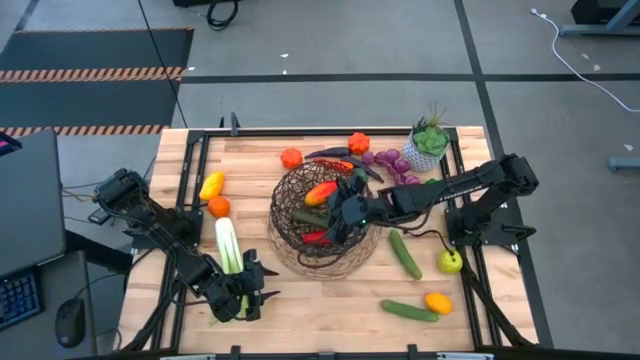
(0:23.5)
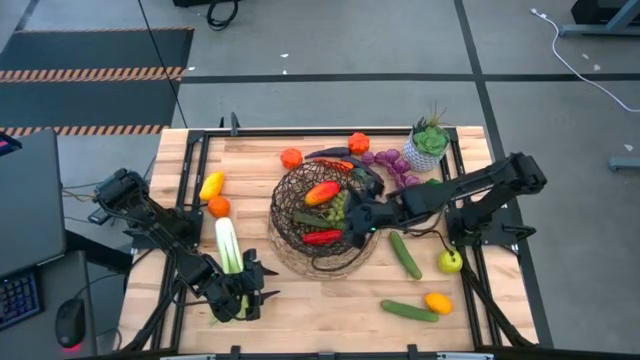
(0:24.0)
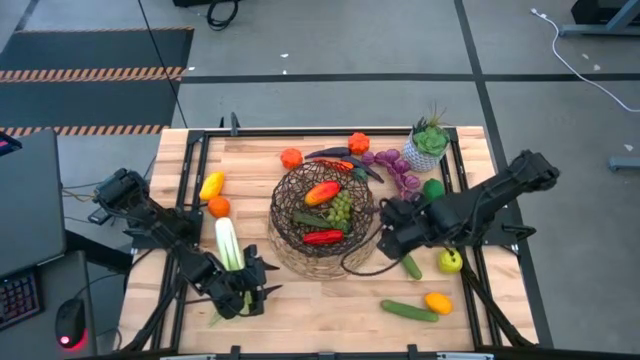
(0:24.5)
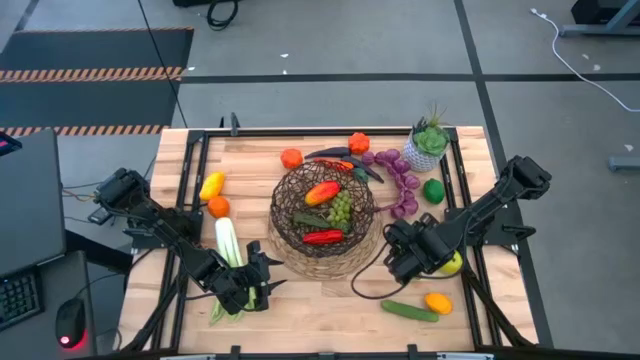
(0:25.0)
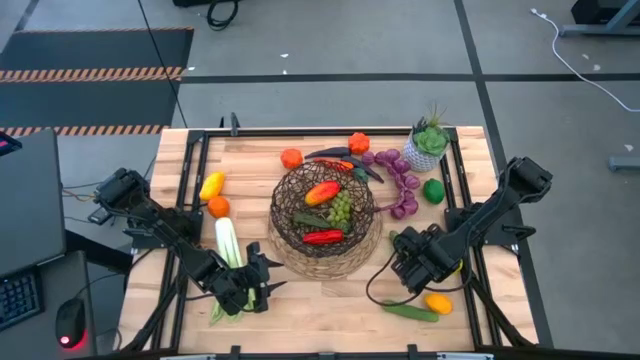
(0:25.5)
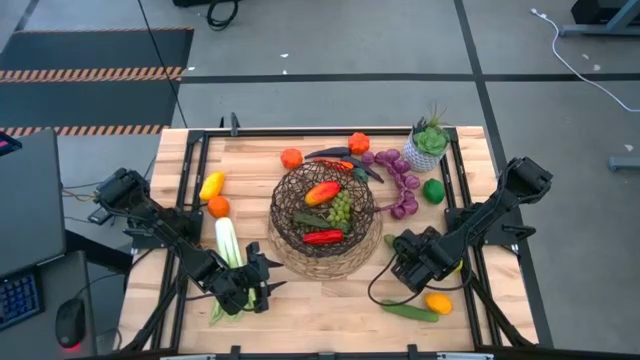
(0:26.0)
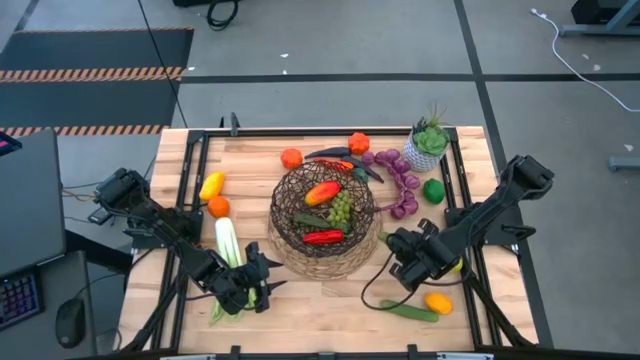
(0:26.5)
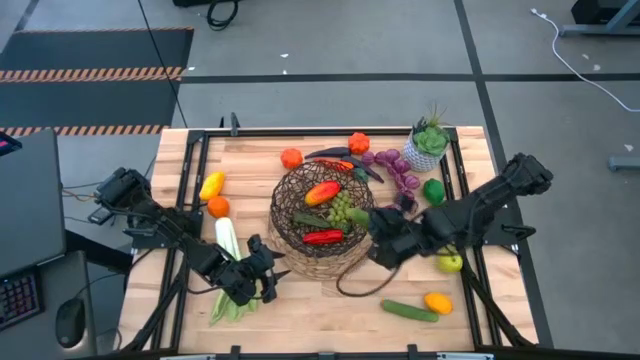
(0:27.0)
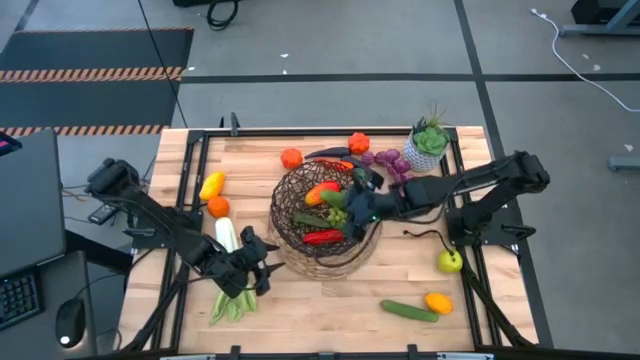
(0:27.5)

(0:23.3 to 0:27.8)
Task: Build produce basket
Put the top green cucumber into the black basket

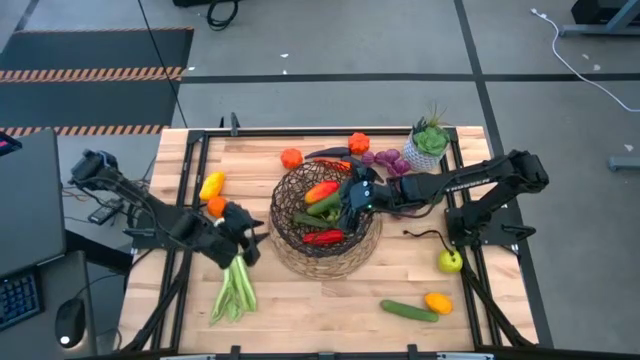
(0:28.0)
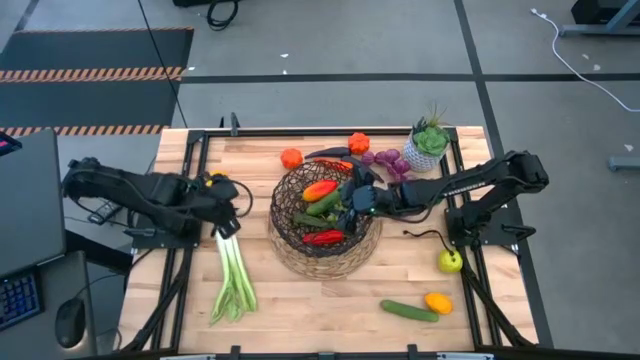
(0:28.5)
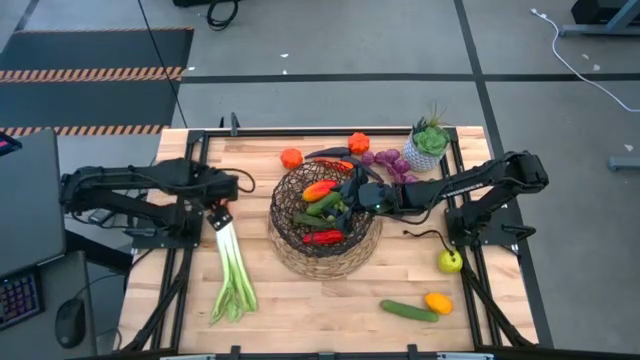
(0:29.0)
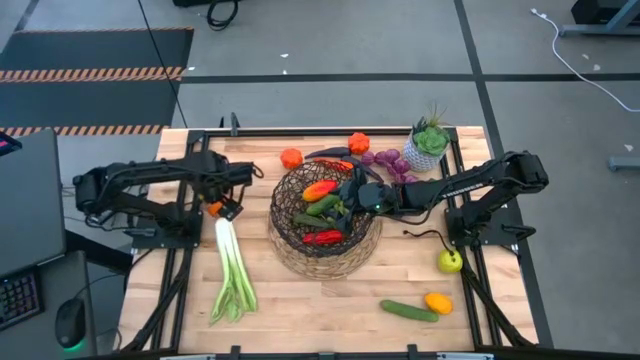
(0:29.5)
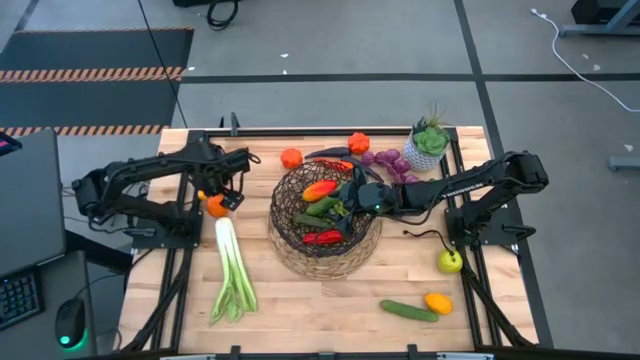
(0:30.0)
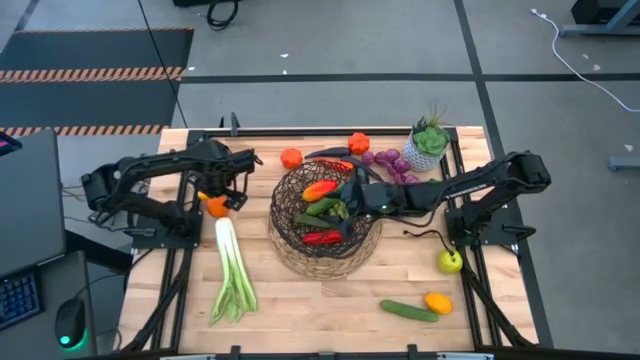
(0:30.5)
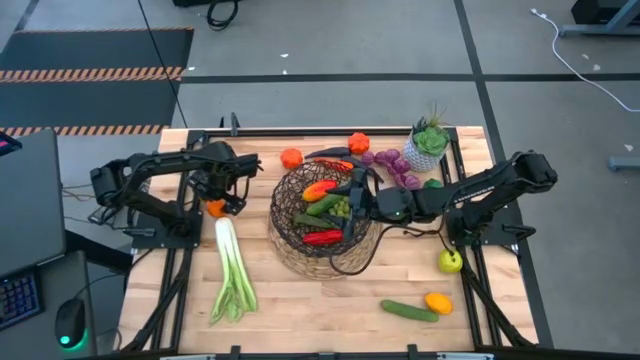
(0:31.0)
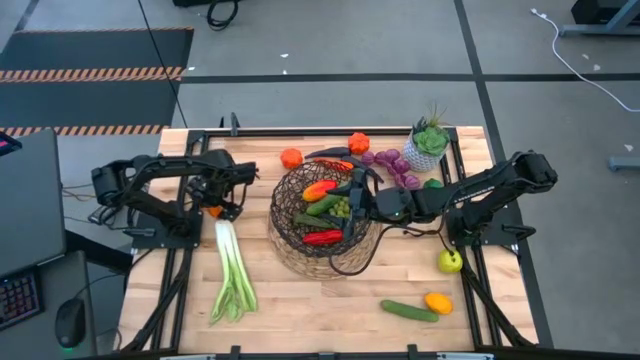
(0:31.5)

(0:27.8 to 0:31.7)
Put the orange into the black basket

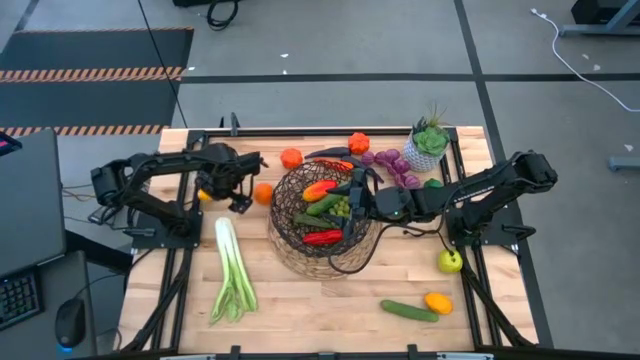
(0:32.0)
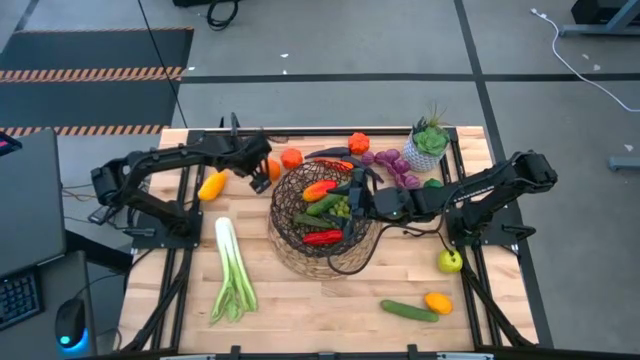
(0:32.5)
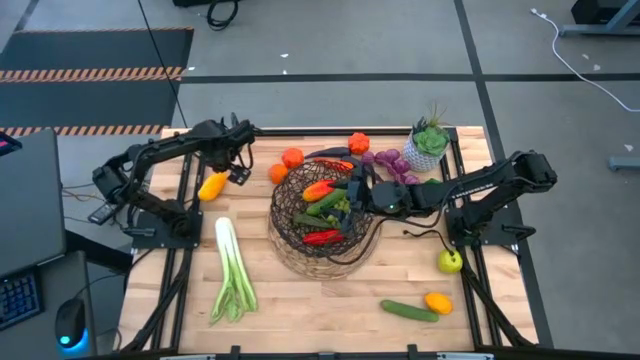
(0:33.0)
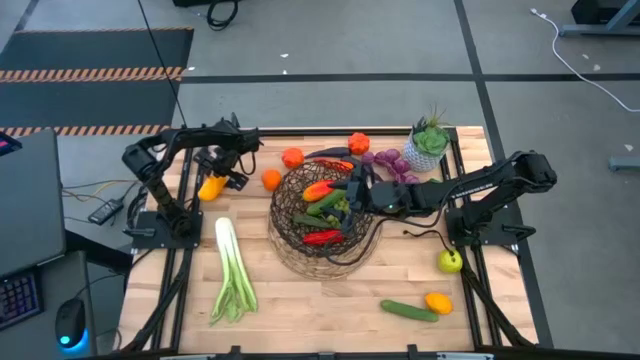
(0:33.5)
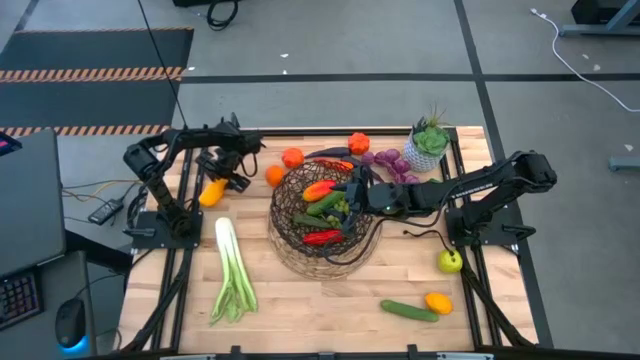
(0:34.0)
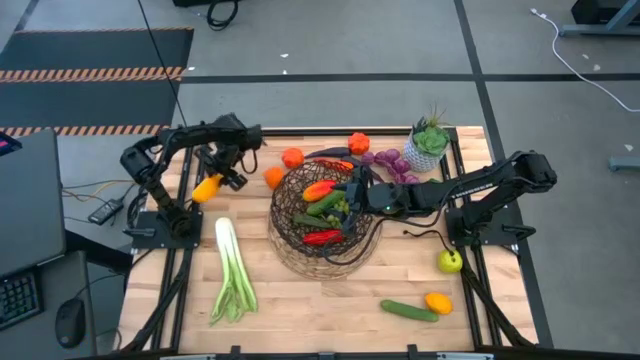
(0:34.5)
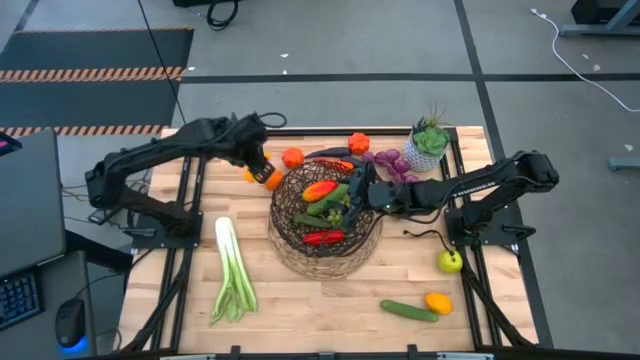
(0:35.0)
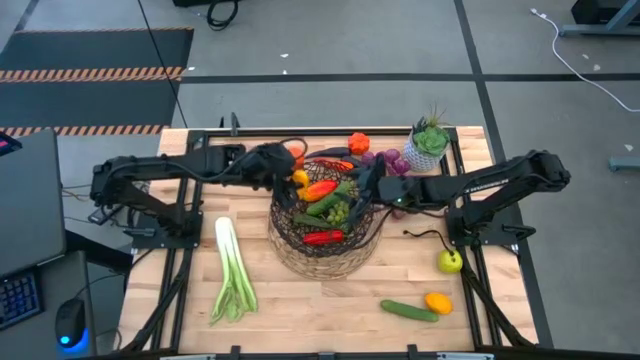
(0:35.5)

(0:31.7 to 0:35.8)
Put the yellow mango into the black basket

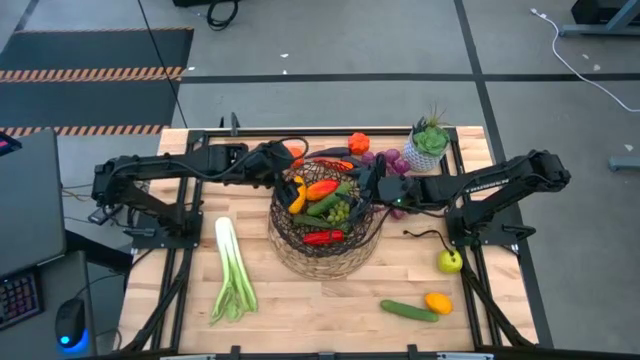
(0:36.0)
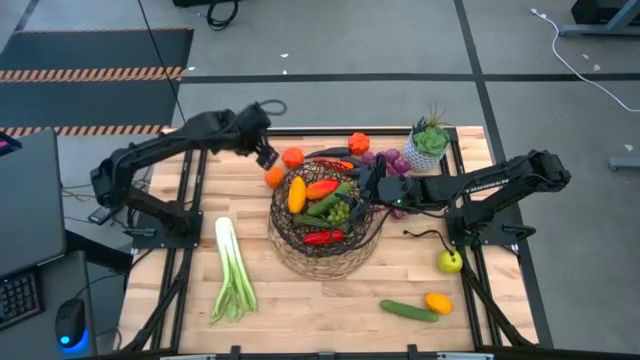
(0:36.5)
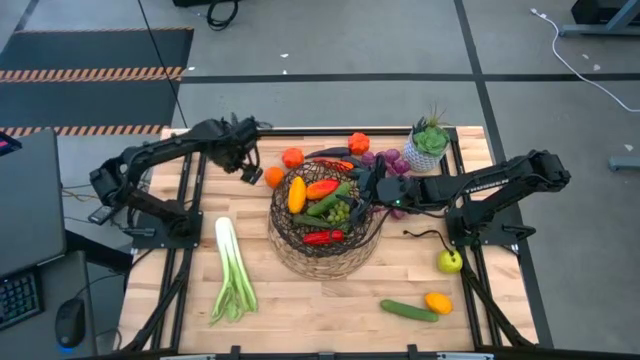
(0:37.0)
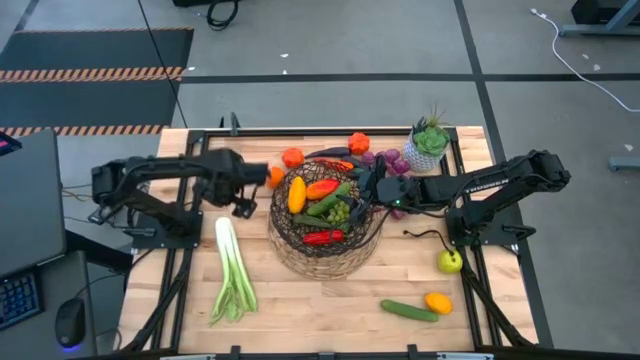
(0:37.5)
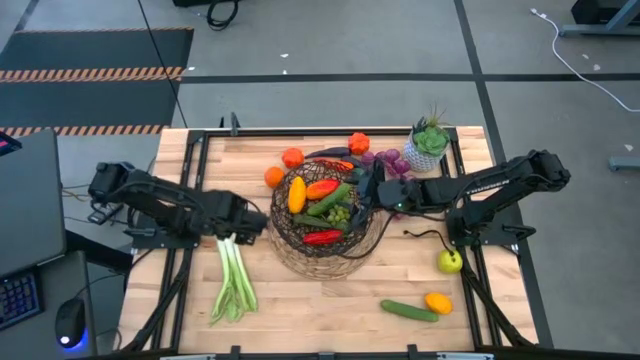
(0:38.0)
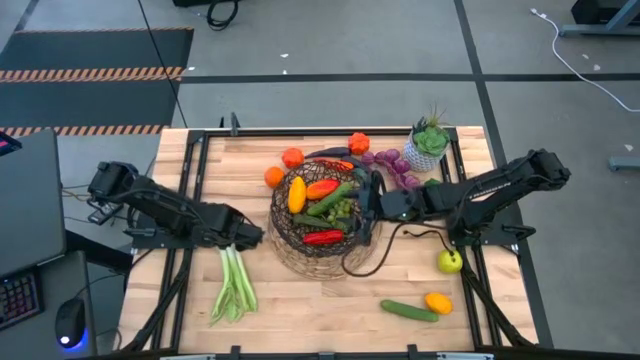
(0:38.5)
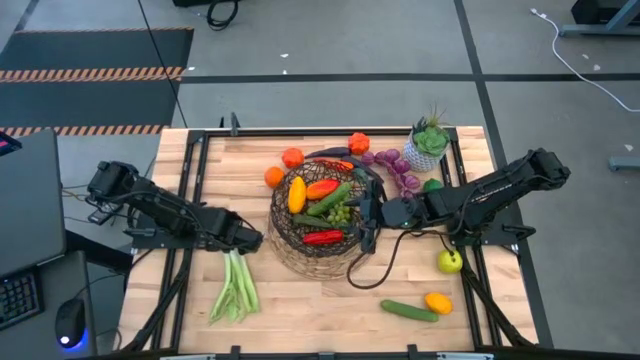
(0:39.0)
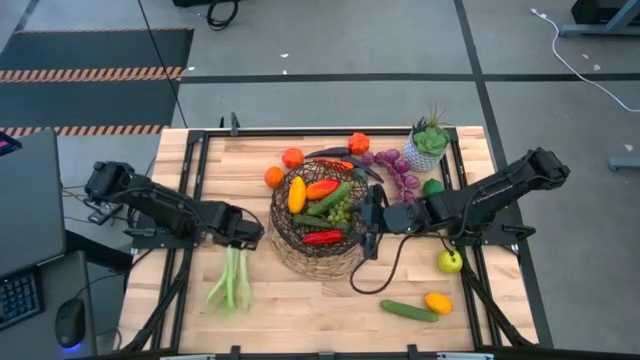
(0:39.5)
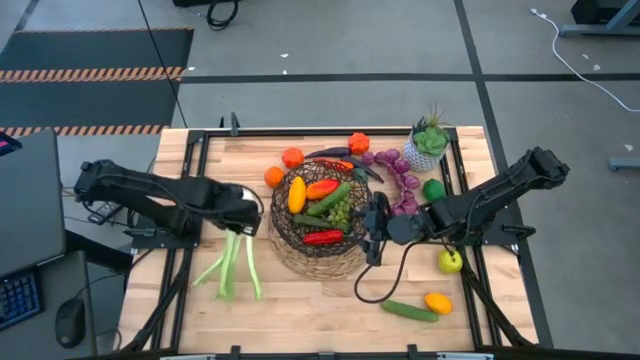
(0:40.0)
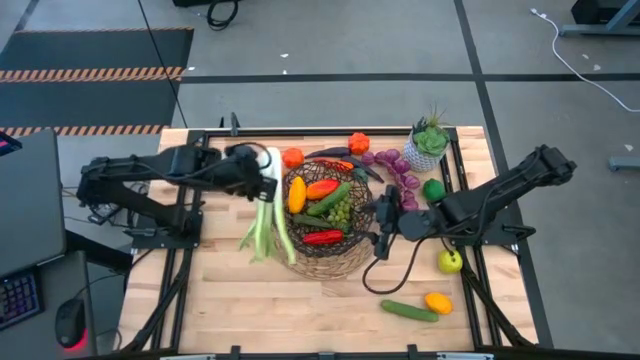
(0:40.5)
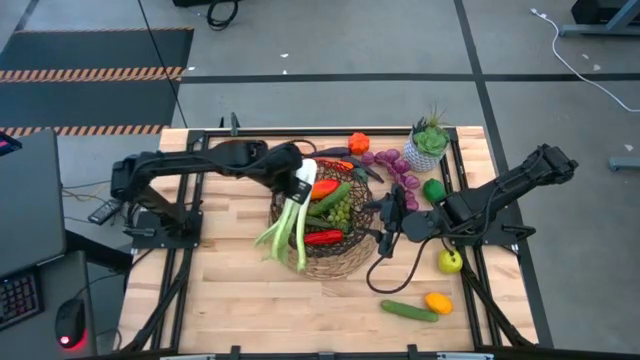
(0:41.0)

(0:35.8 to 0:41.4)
Put the green celery into the black basket

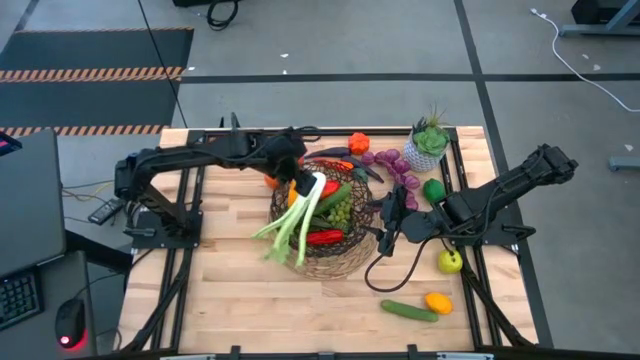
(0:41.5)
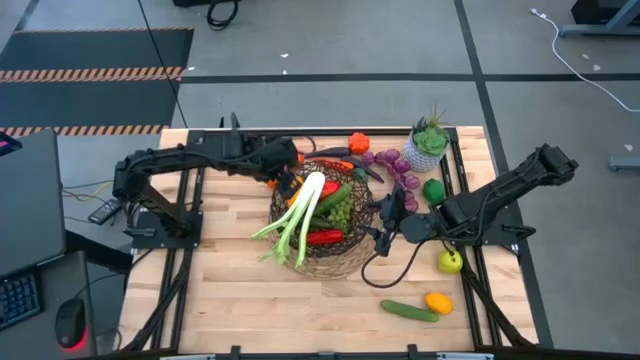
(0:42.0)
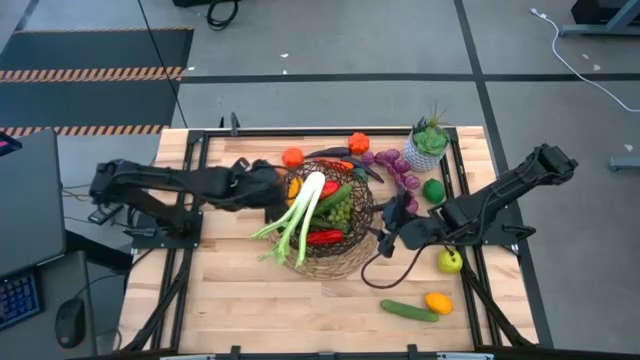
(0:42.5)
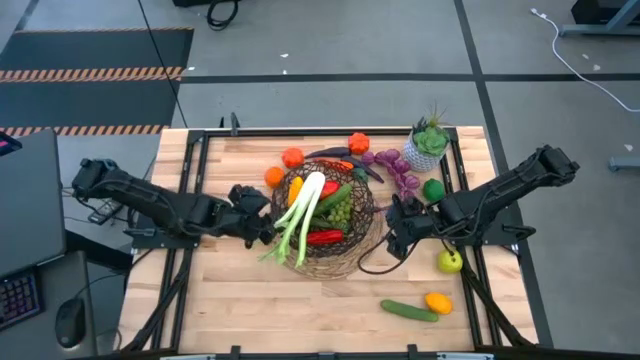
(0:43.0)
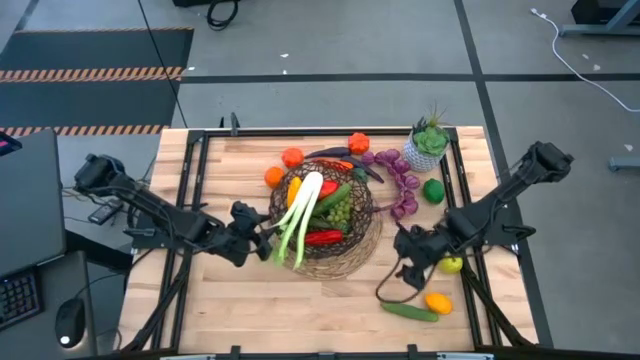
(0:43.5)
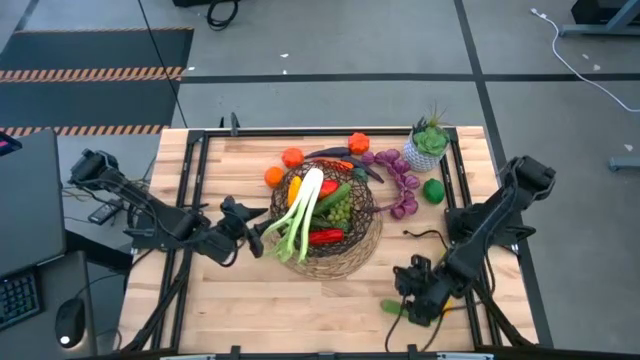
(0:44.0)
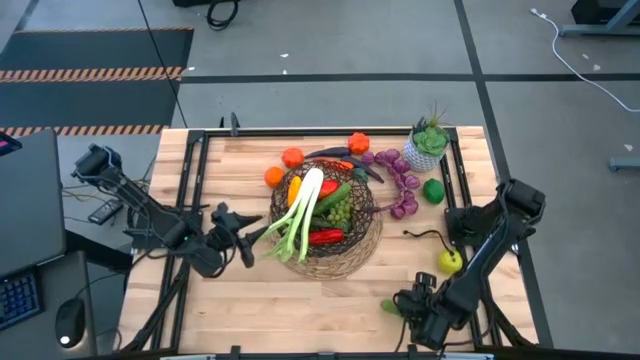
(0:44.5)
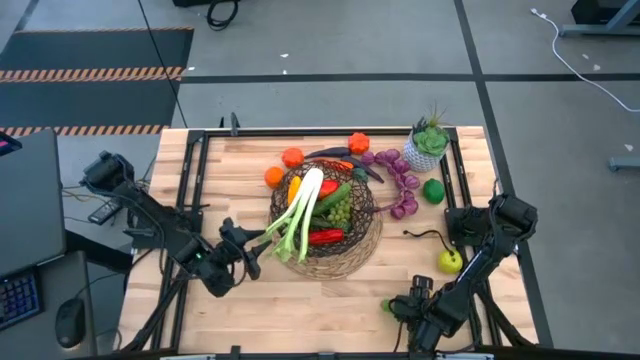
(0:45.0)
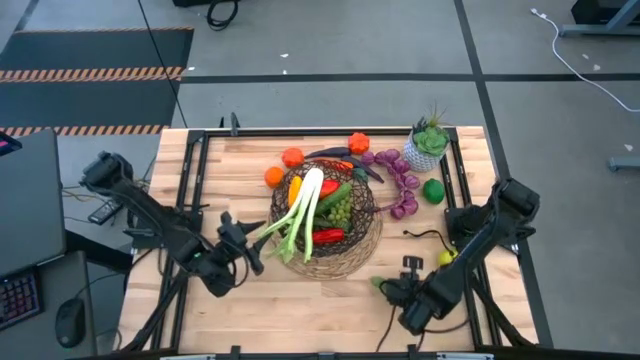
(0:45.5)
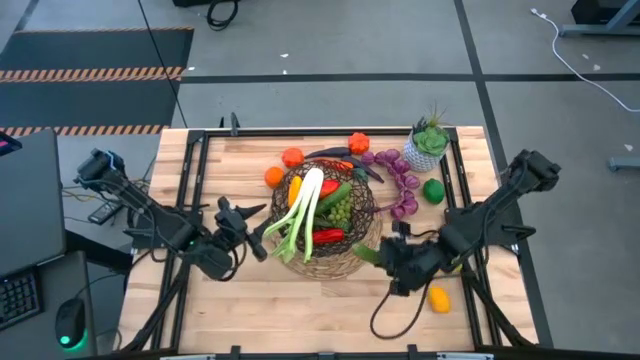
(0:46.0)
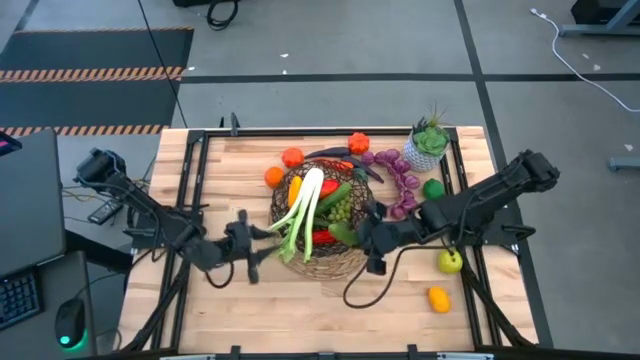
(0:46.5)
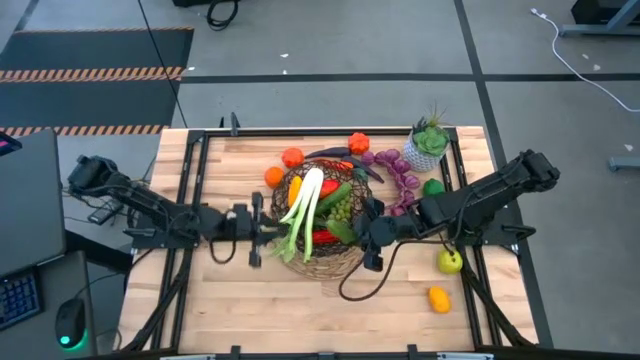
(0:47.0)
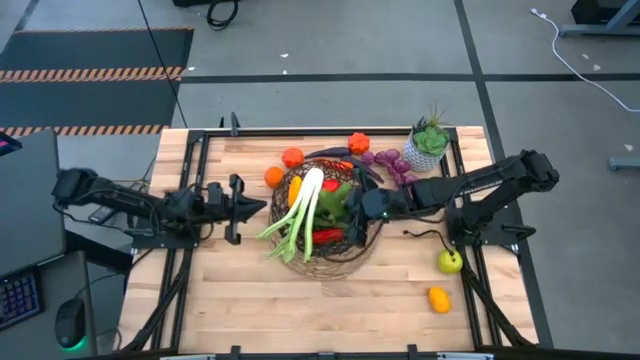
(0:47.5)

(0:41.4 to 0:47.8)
Put the green cucumber into the black basket
